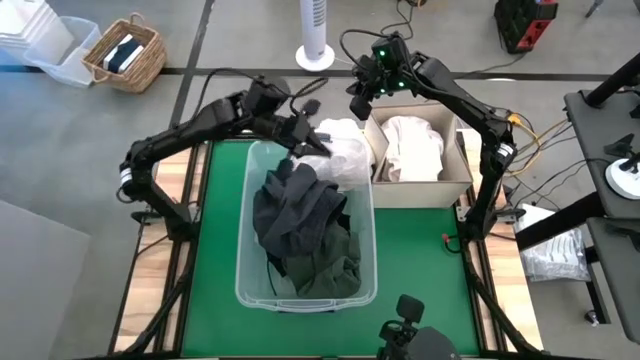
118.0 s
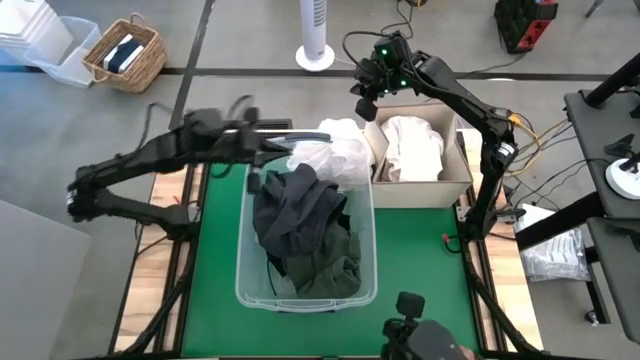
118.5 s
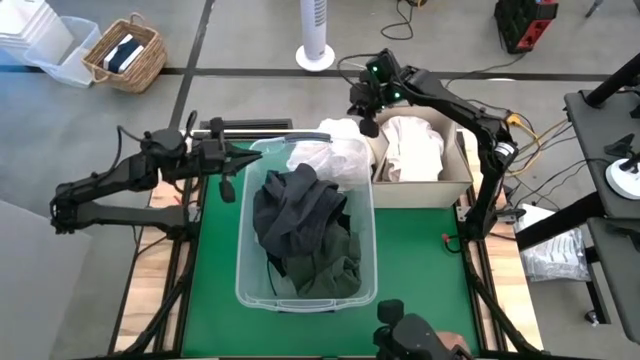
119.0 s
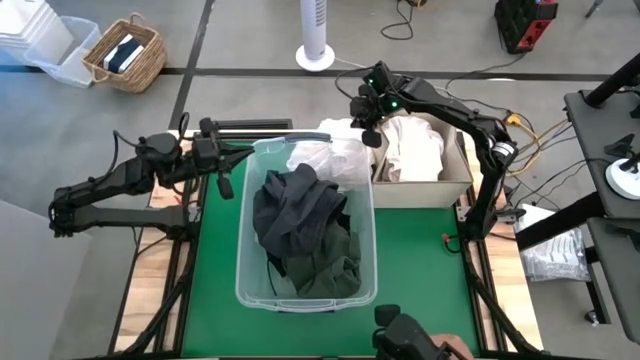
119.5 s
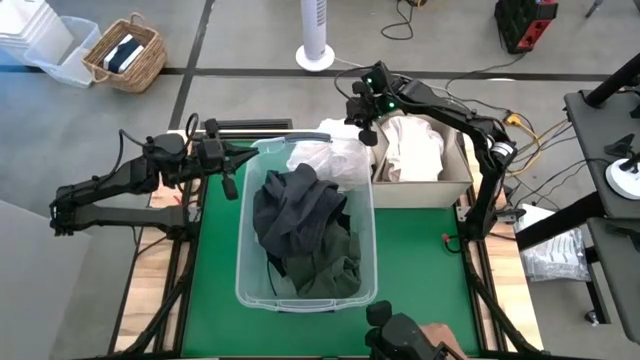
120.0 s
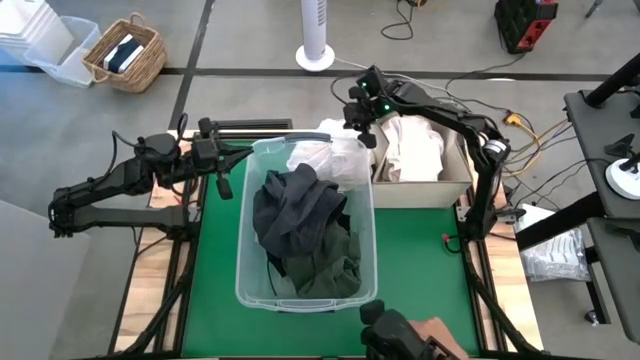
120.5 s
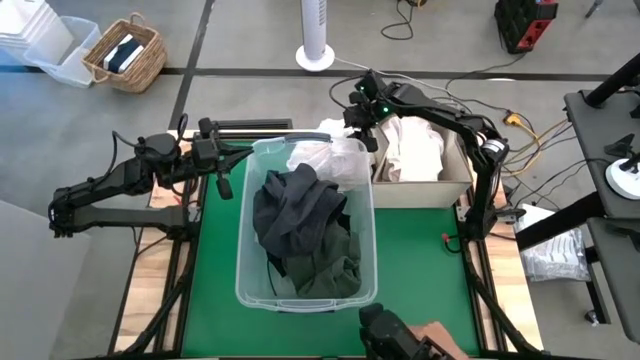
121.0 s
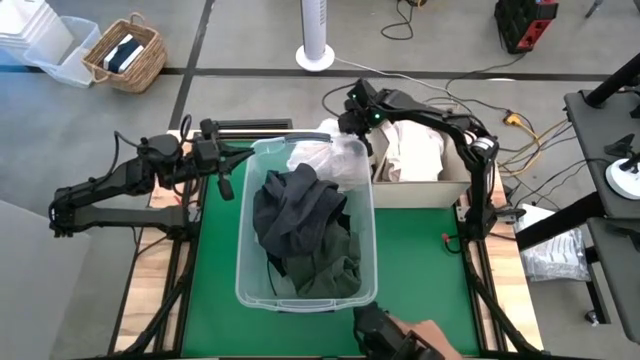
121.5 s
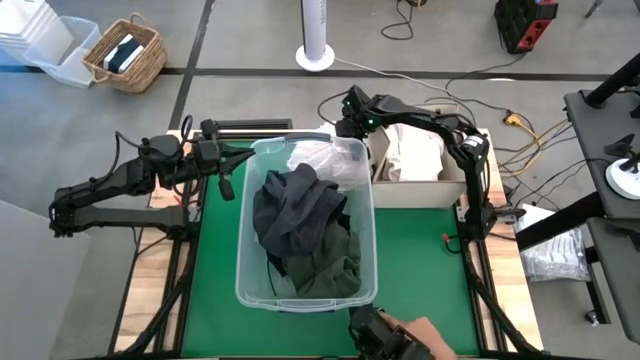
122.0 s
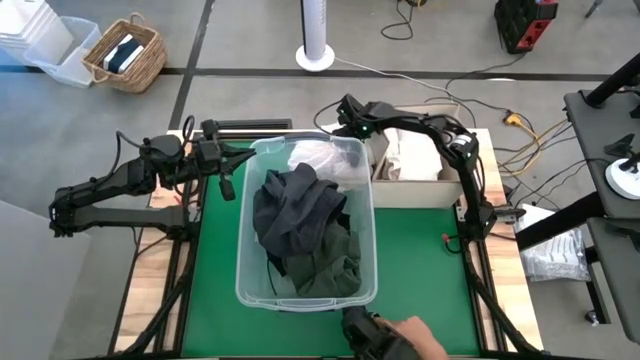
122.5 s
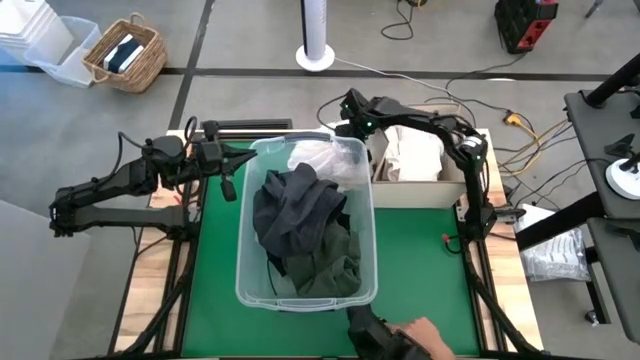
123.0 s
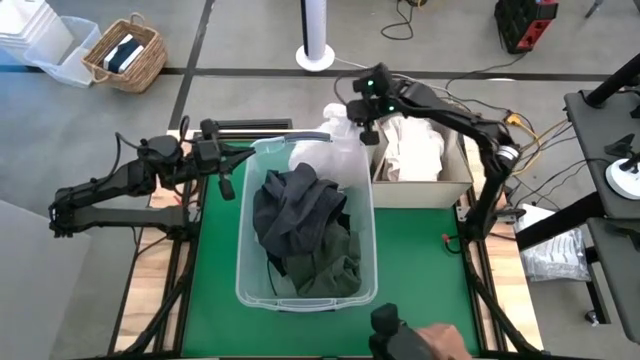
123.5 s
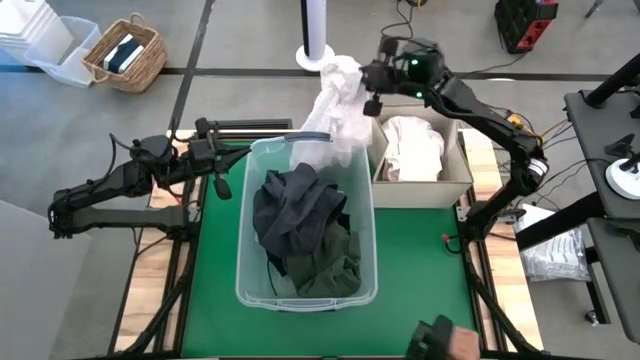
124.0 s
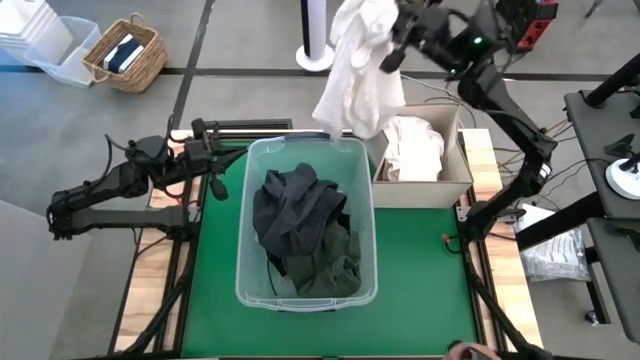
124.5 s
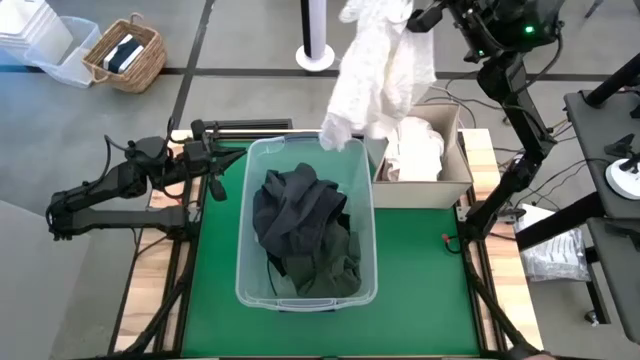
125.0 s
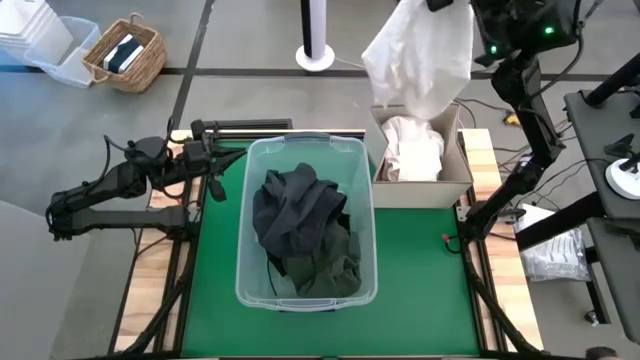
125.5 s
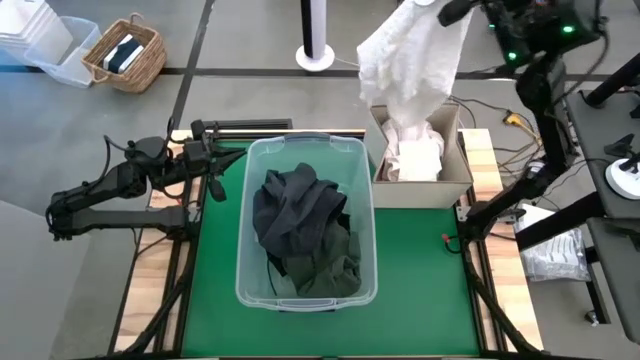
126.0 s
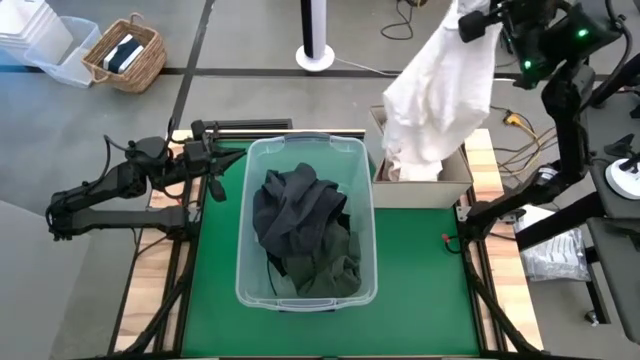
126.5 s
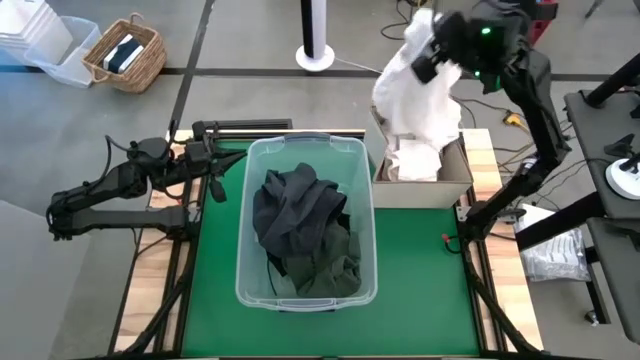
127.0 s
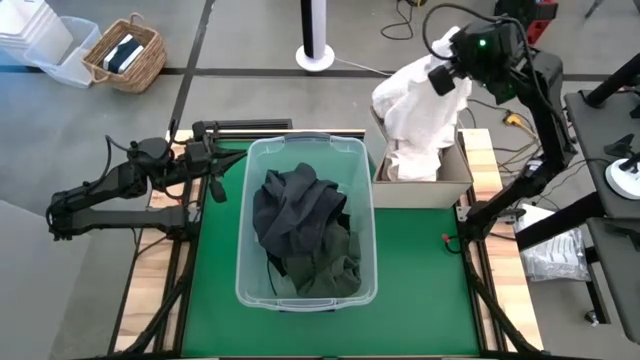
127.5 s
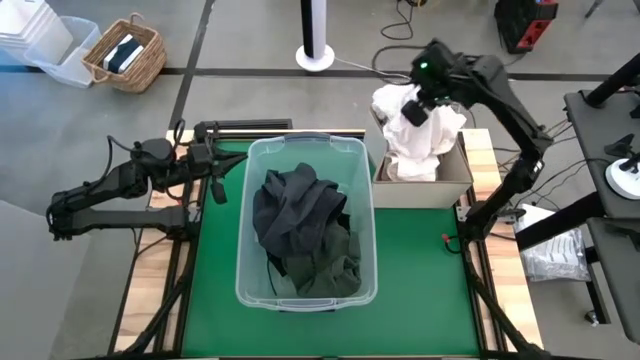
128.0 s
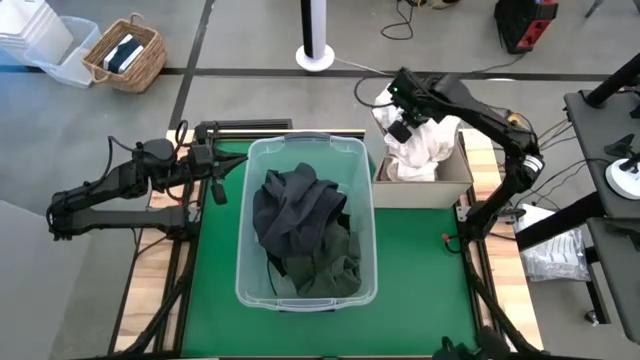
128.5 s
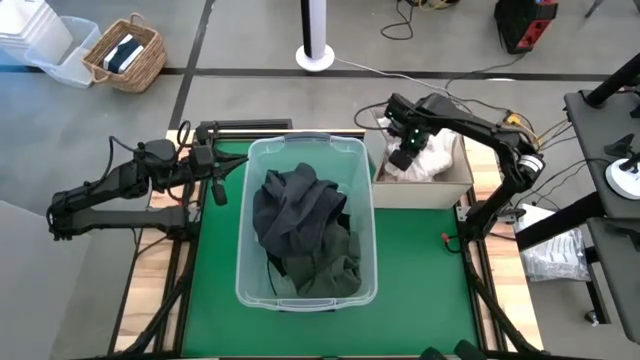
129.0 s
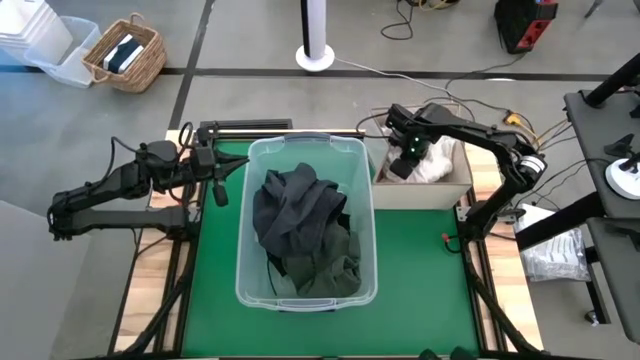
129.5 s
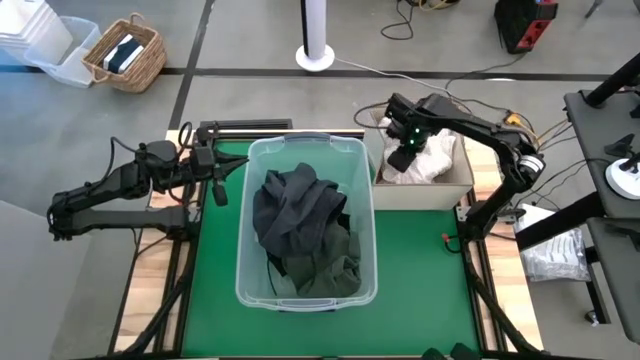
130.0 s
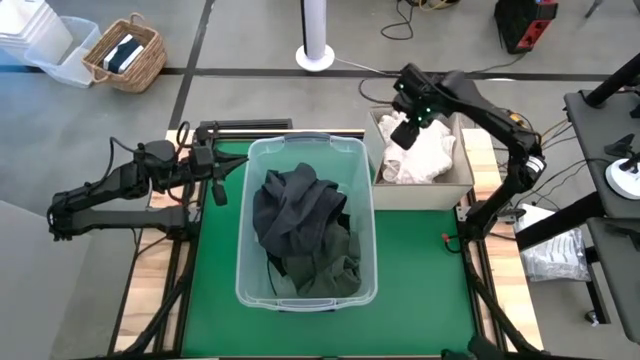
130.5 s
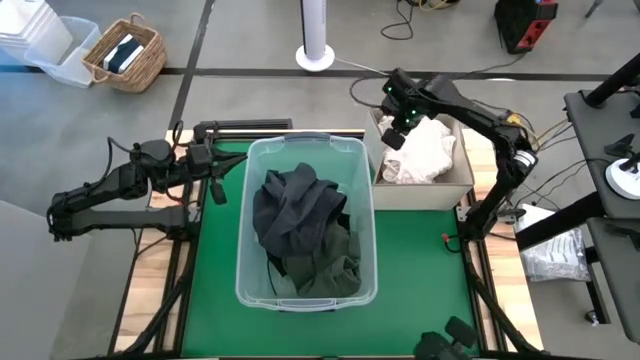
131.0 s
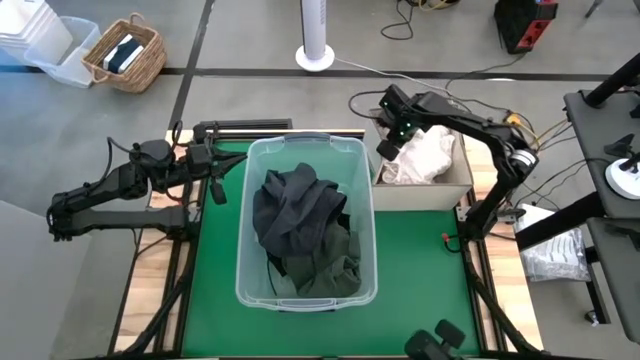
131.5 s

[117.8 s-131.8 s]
Put the white blouse into the laundry organizer

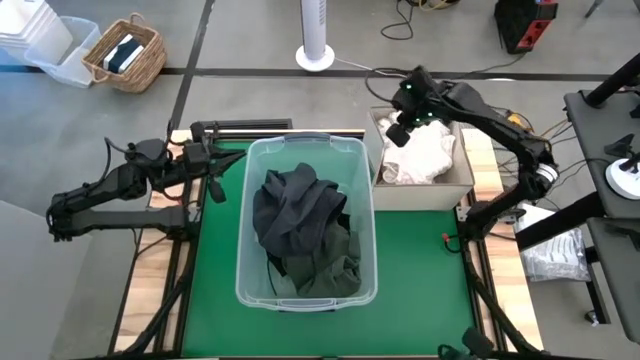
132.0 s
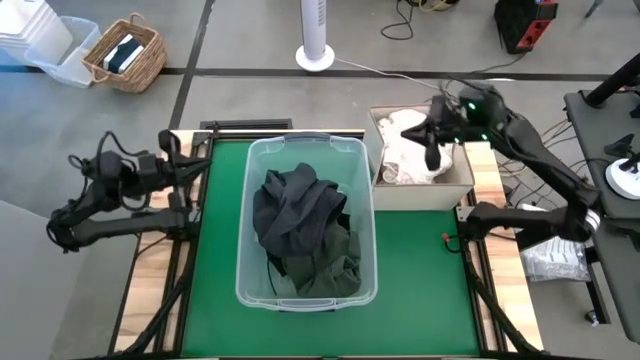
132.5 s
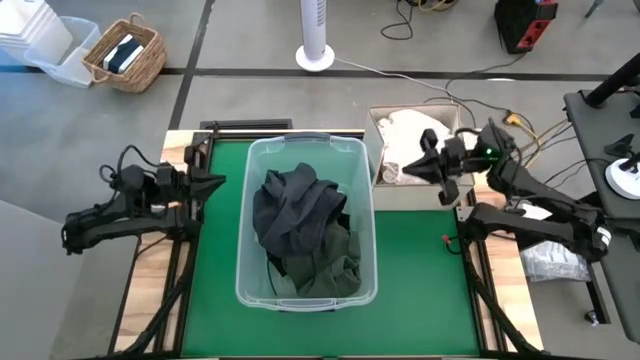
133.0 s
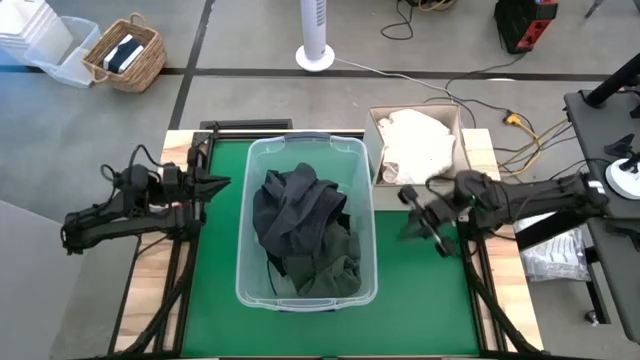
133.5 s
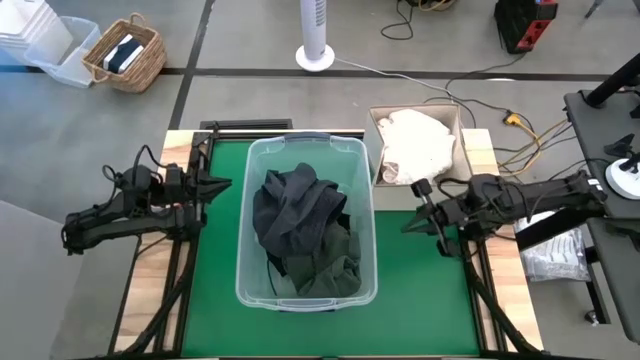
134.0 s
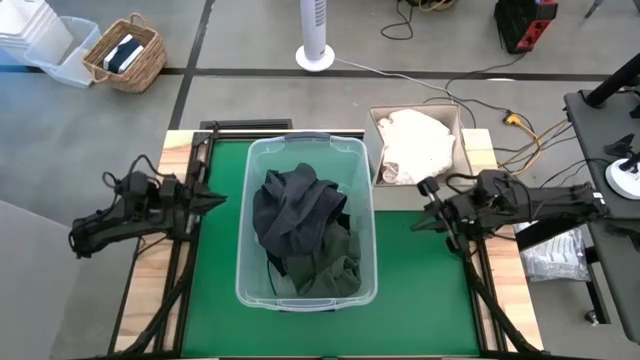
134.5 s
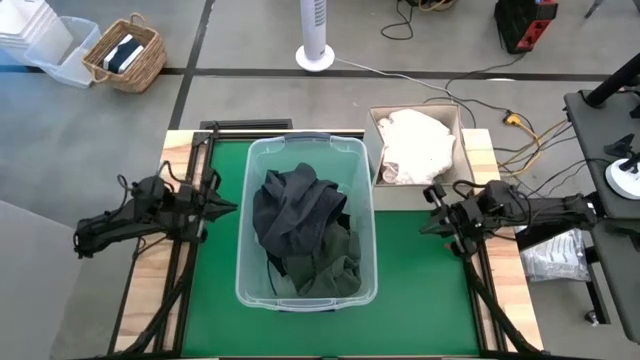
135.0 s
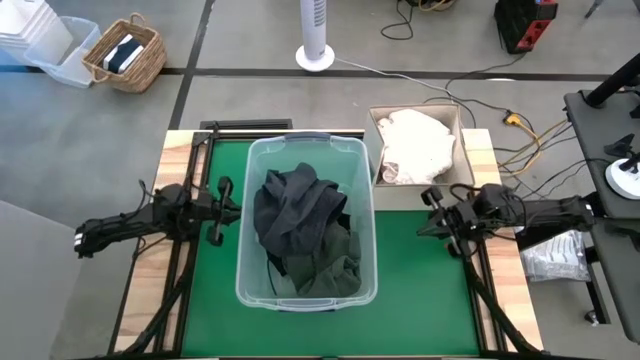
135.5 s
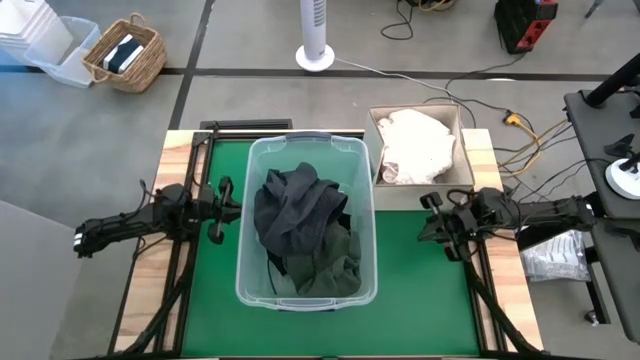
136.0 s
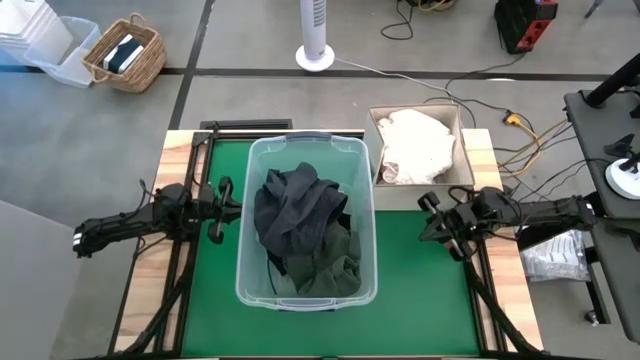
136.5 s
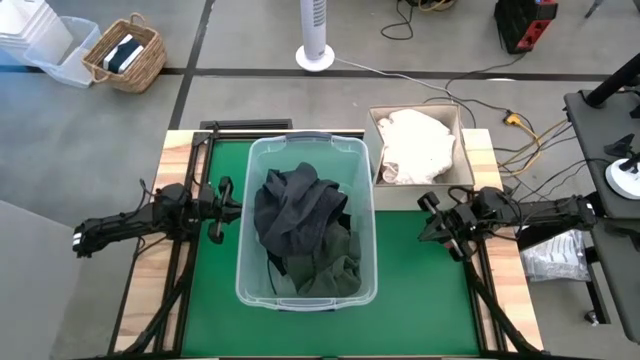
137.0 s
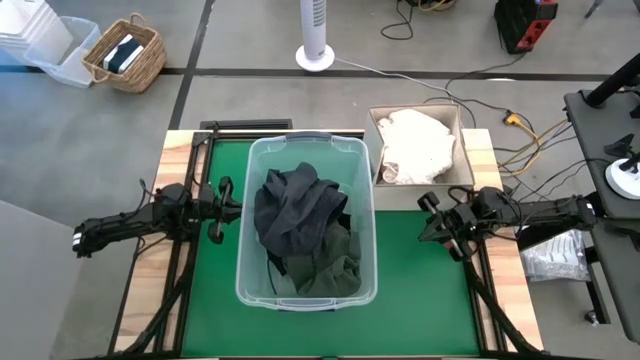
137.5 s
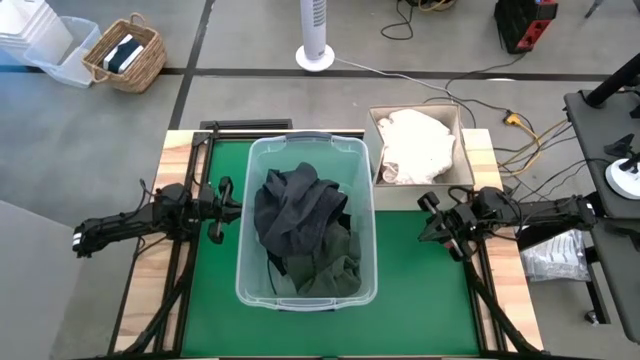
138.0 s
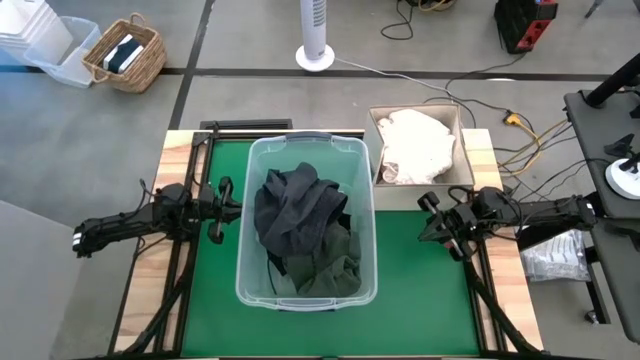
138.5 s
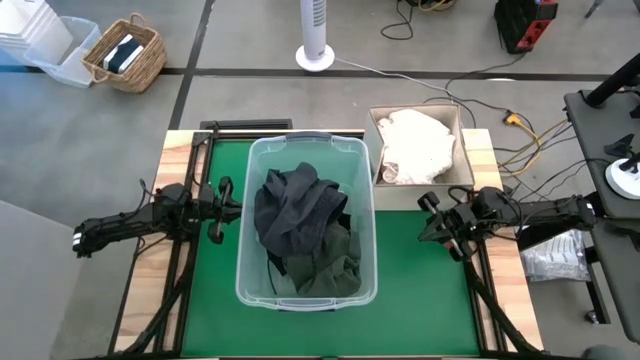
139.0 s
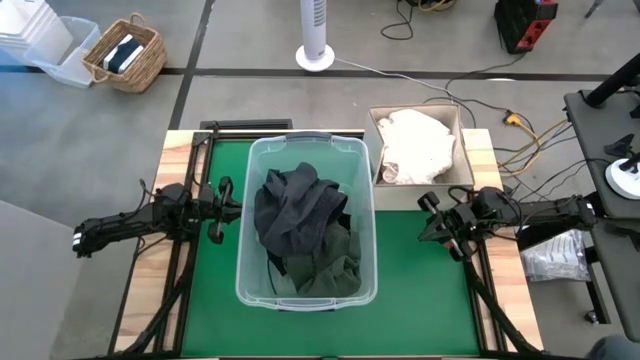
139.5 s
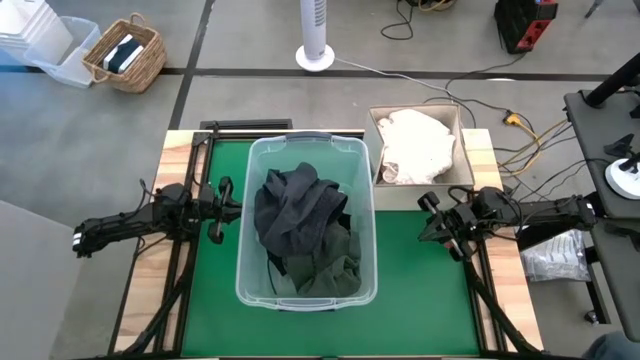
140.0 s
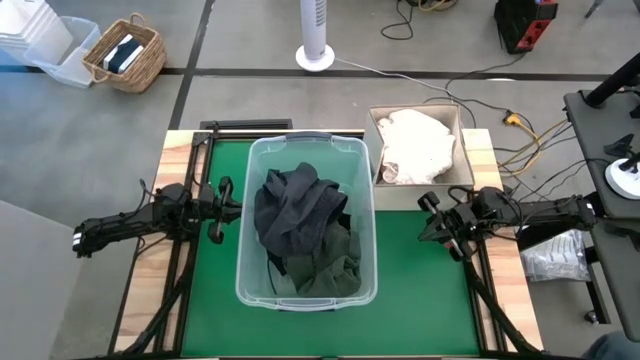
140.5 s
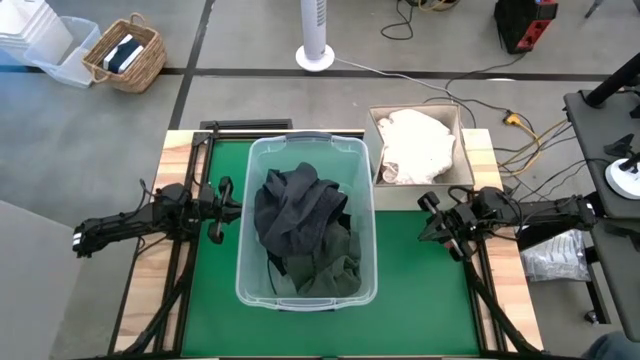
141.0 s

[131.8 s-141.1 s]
Return to Home Position
